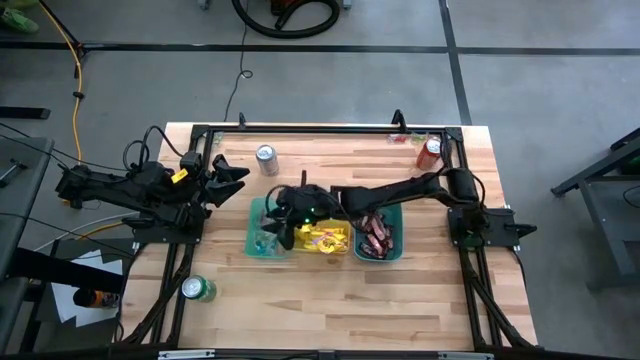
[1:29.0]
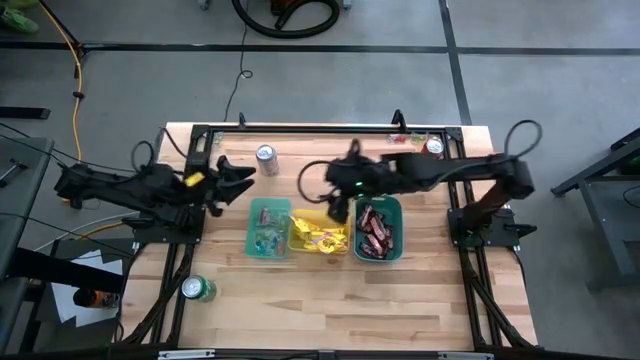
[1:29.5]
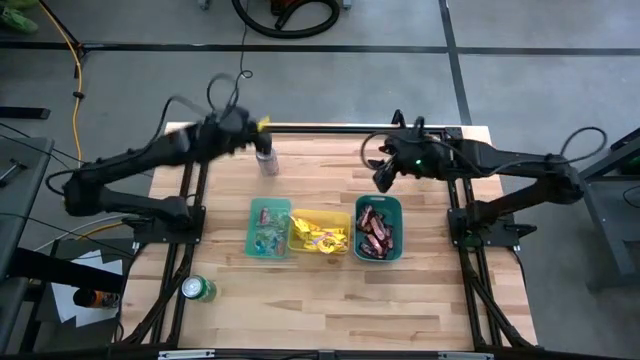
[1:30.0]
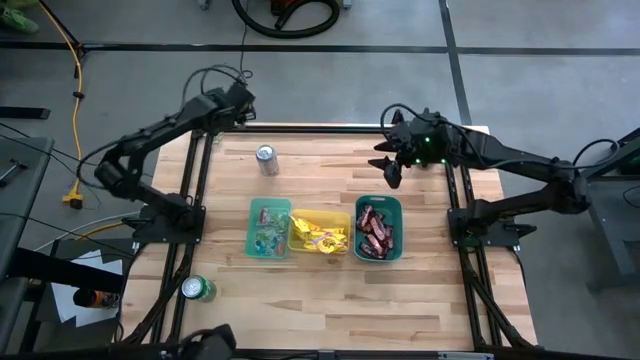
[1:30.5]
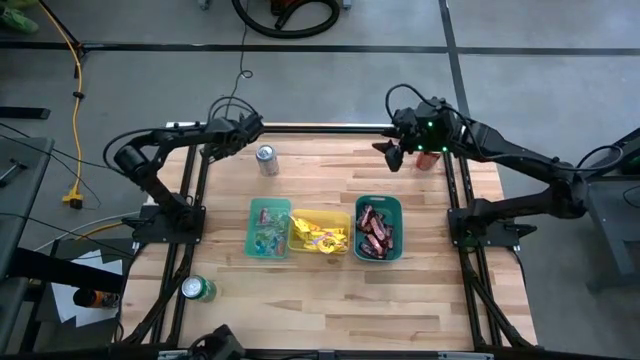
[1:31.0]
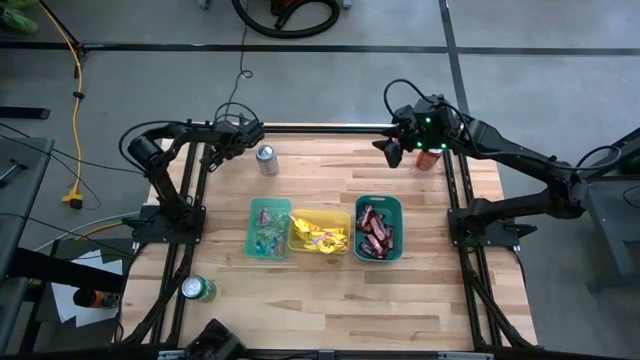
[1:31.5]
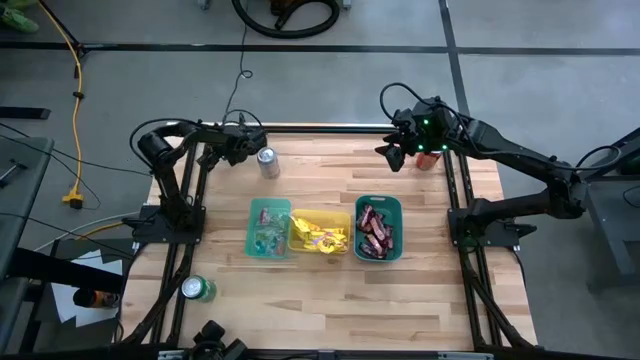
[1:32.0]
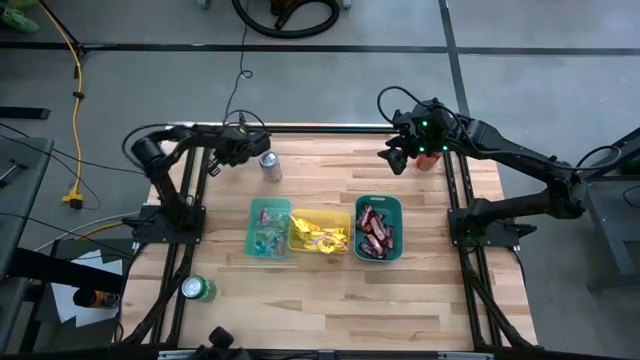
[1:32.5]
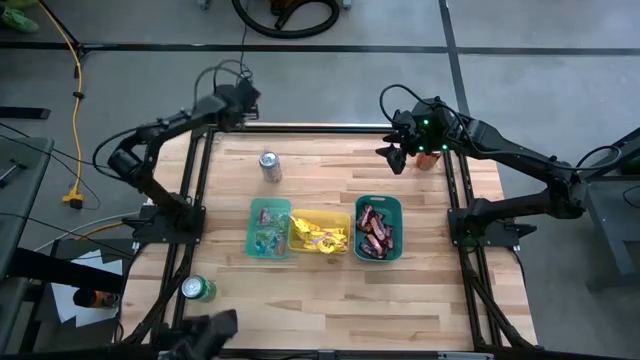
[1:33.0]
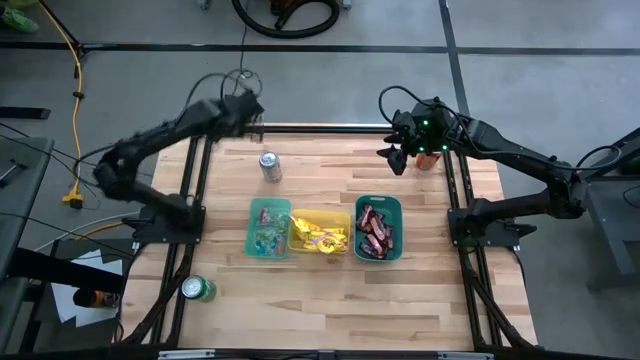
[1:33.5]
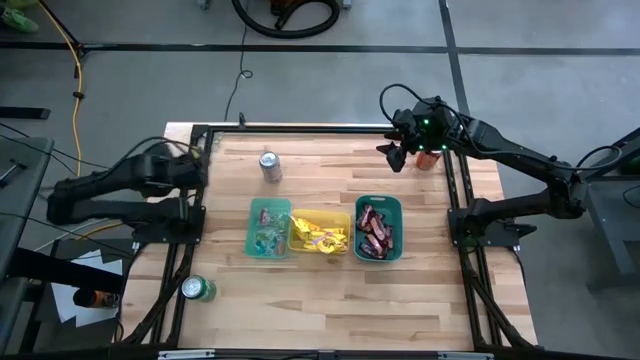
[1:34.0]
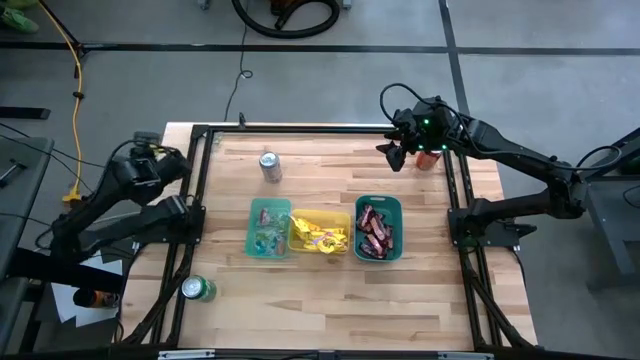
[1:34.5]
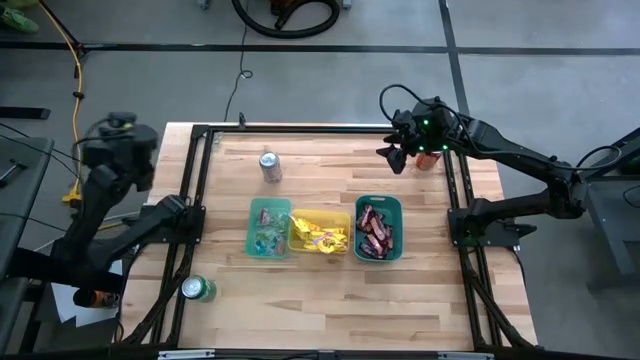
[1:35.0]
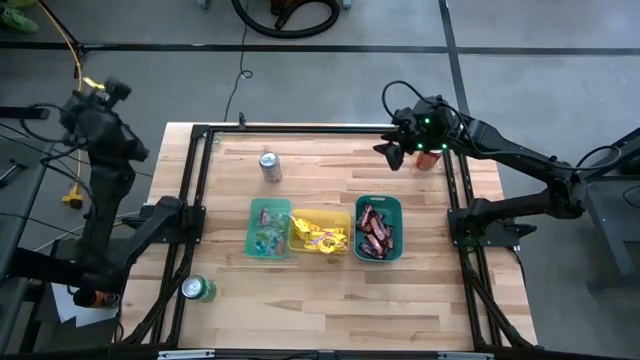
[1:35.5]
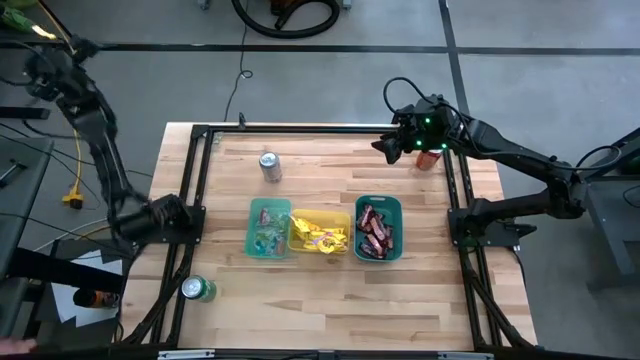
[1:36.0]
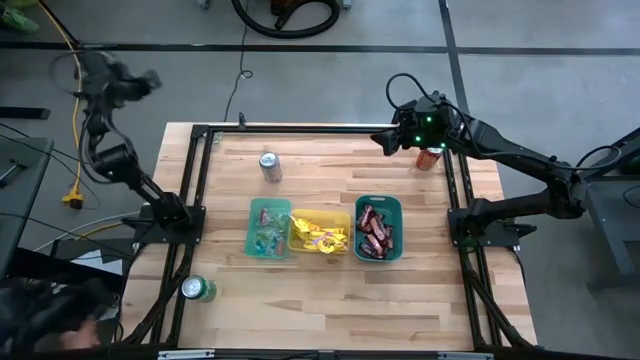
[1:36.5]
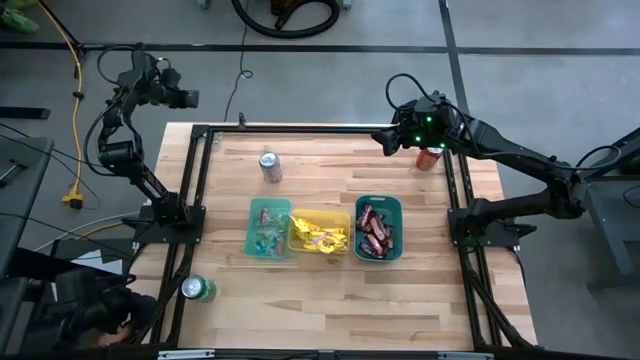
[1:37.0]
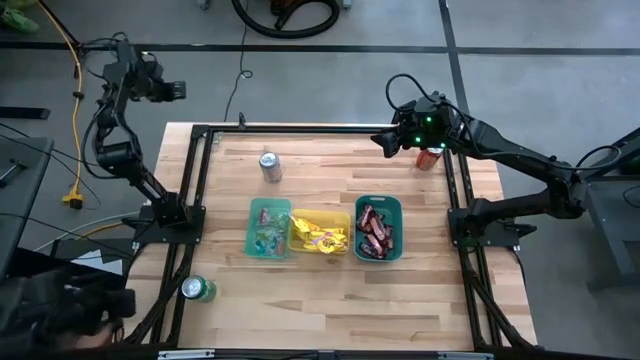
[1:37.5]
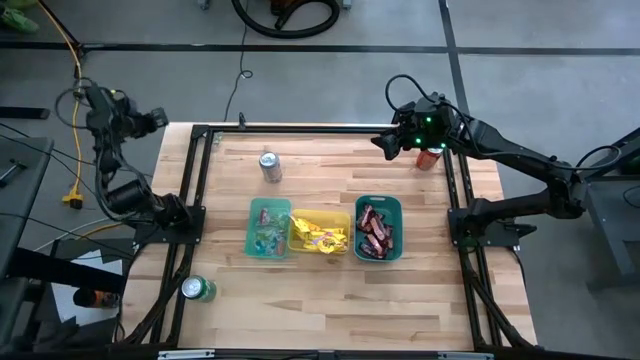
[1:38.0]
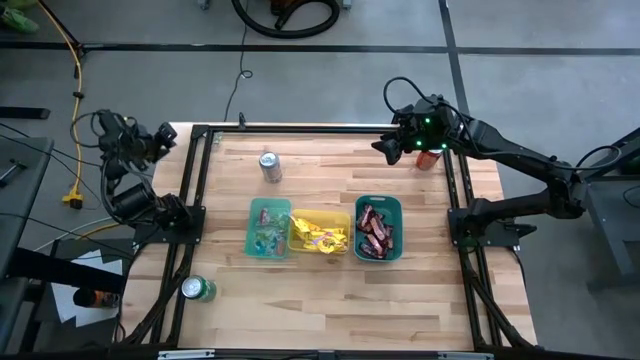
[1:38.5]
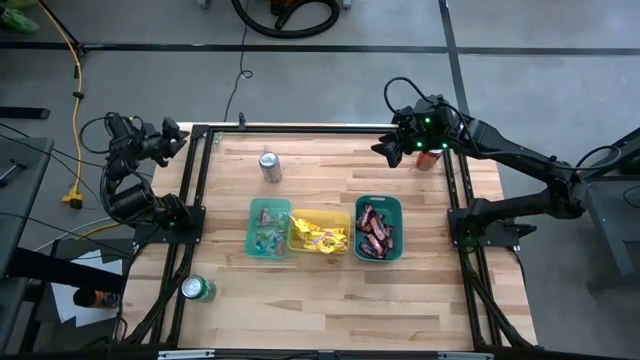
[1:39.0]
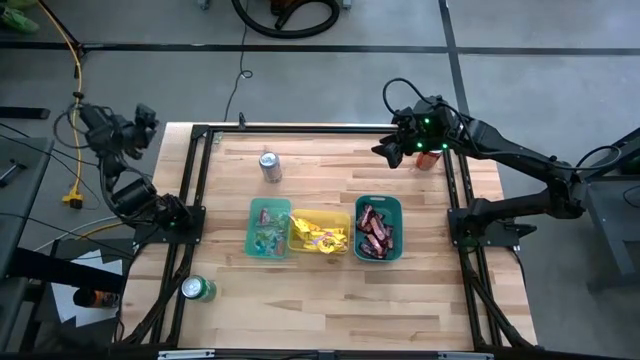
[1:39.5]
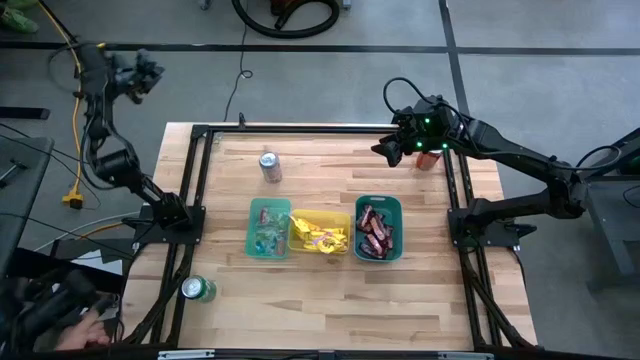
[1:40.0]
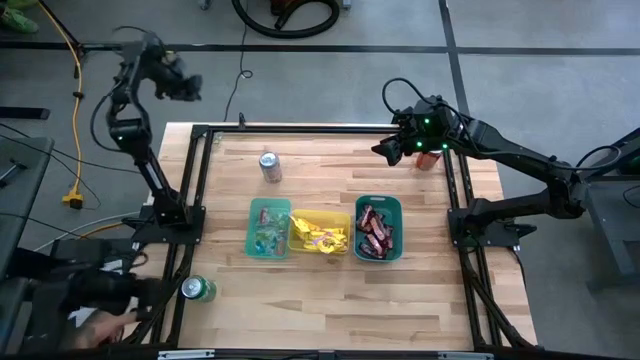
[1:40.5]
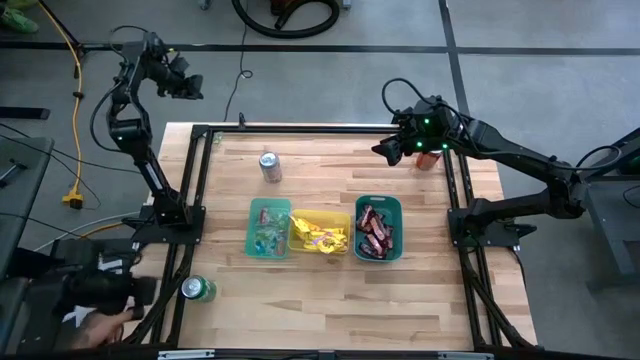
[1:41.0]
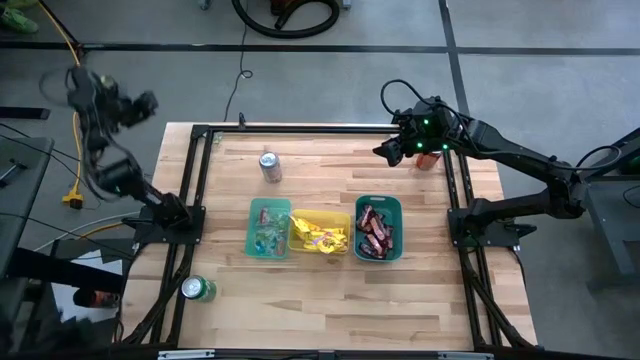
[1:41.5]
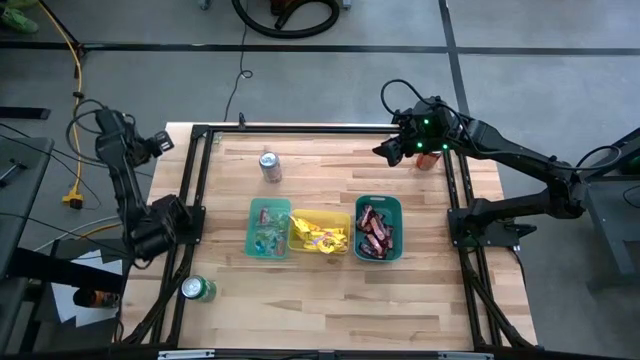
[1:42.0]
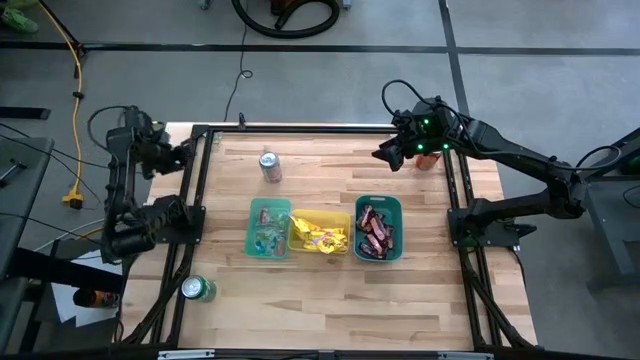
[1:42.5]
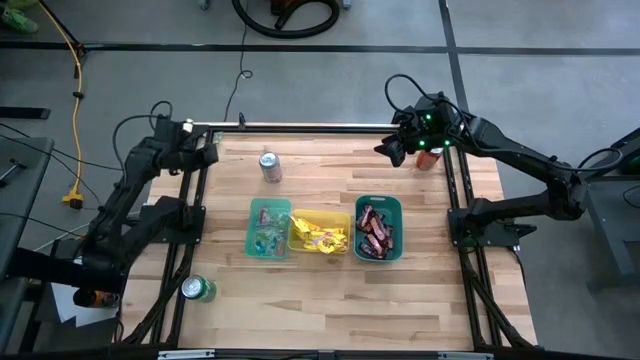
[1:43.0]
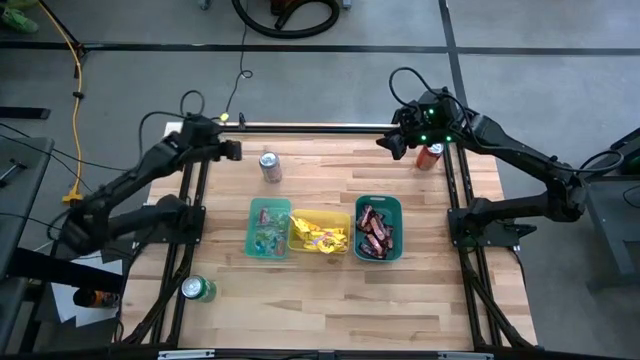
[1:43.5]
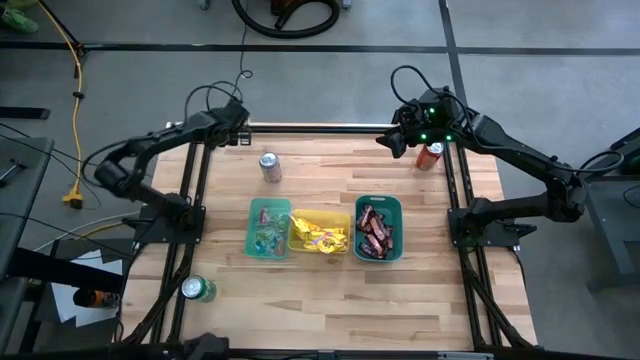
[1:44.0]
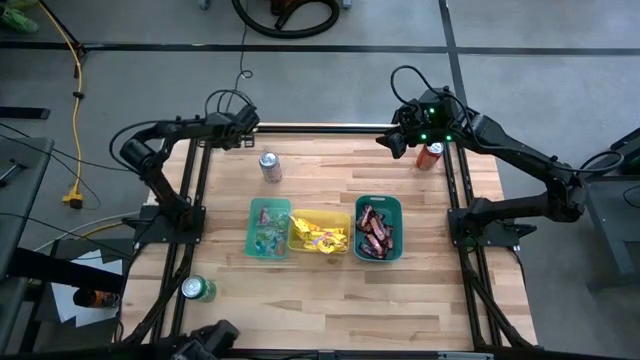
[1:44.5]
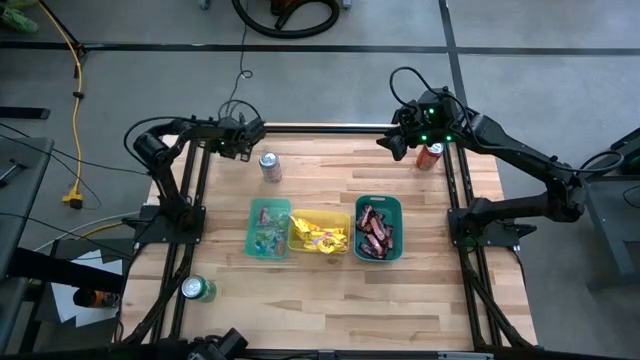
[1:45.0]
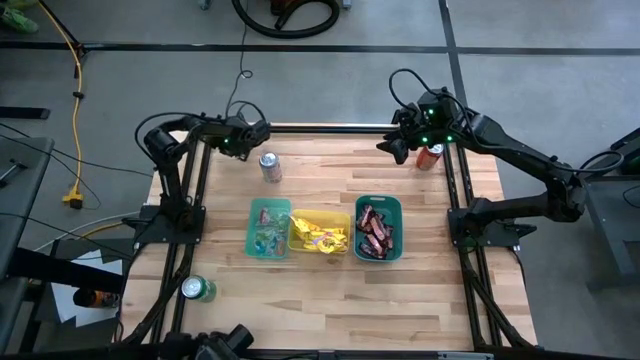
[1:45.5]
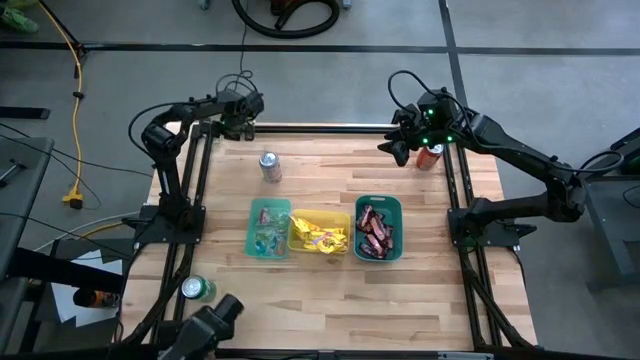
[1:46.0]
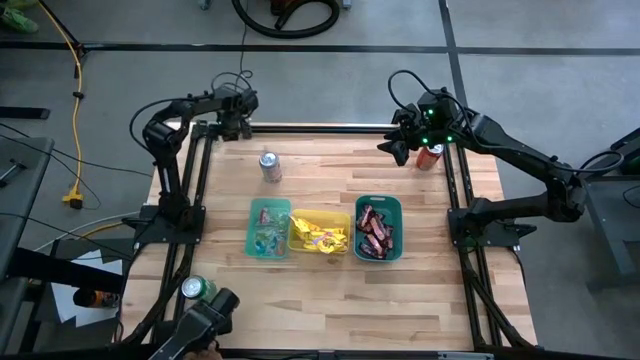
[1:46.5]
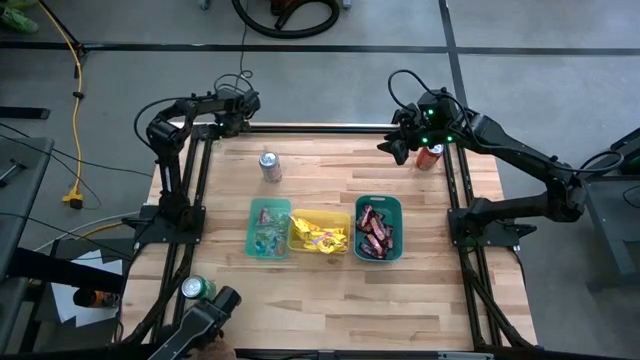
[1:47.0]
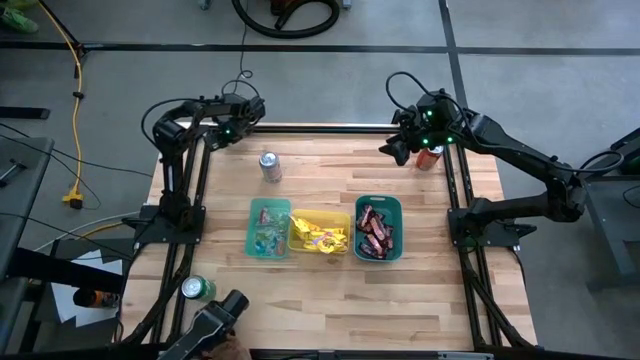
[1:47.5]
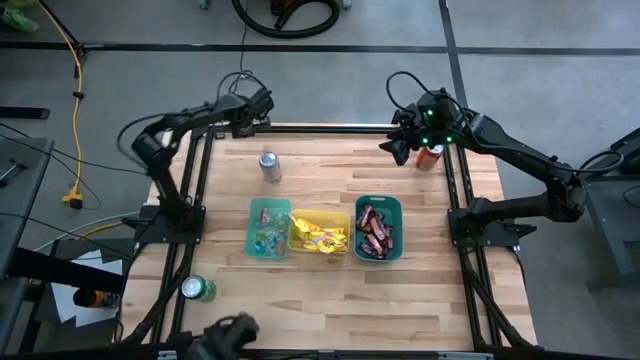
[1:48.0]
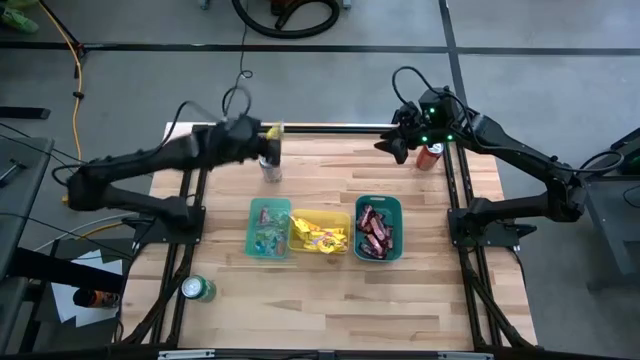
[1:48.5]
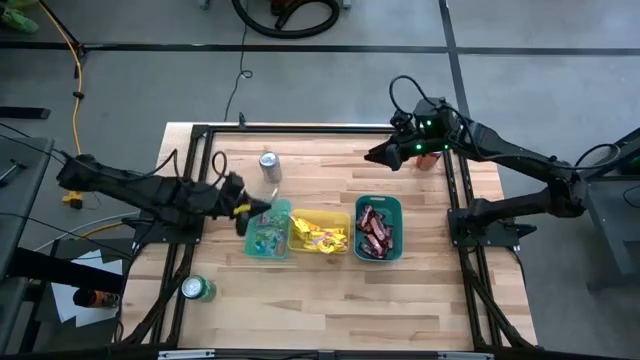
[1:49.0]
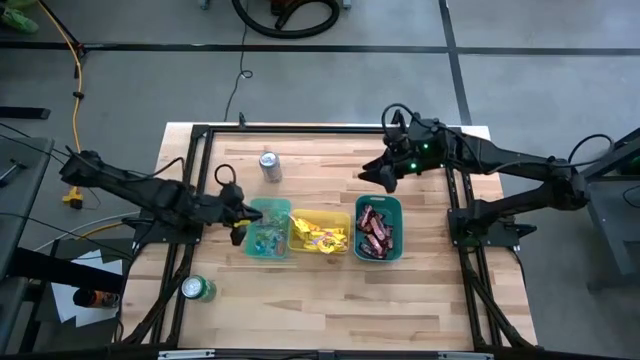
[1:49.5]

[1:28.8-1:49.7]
Task: Sort candy
Put the green gummy into the green bin
